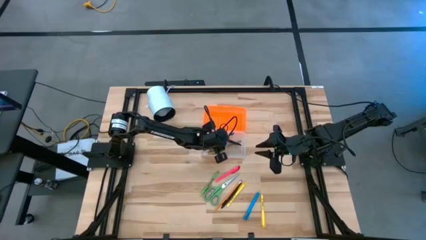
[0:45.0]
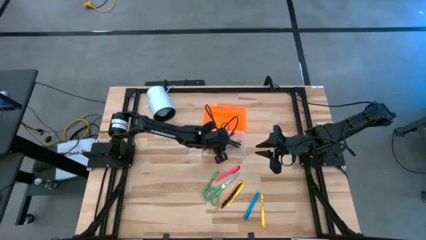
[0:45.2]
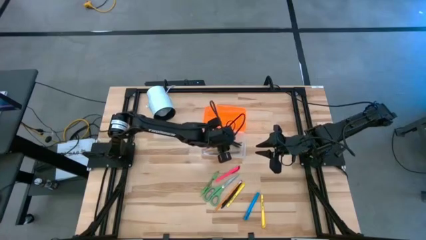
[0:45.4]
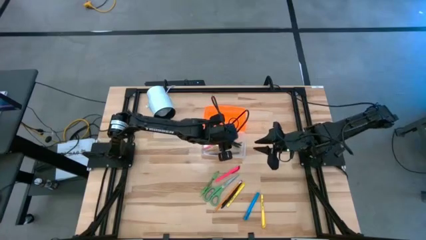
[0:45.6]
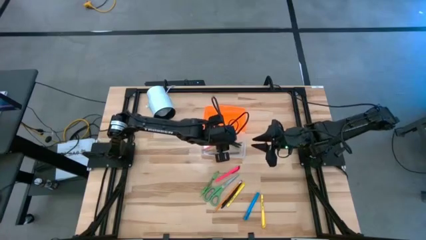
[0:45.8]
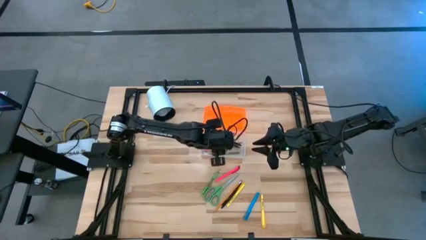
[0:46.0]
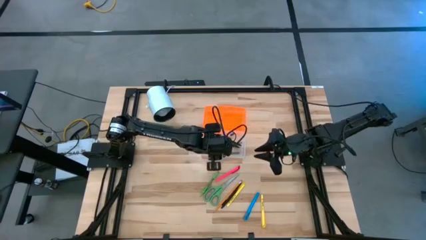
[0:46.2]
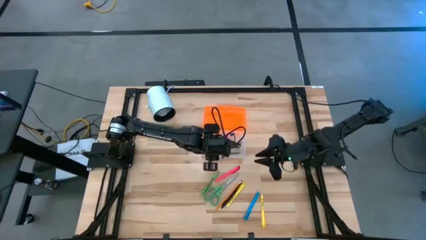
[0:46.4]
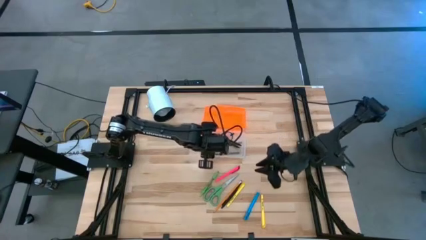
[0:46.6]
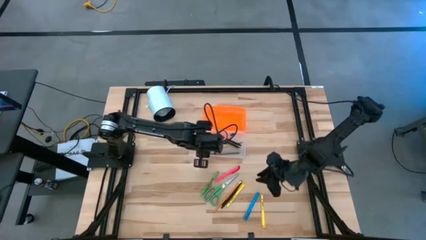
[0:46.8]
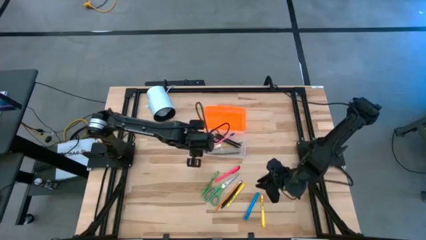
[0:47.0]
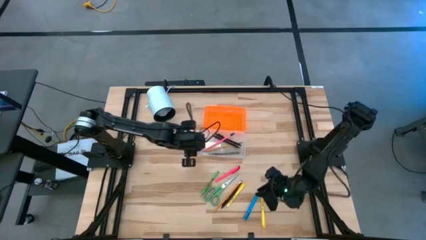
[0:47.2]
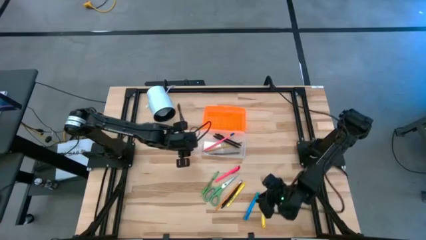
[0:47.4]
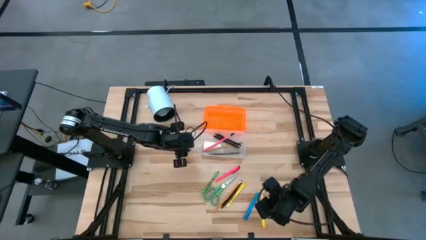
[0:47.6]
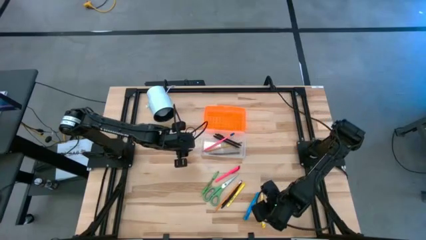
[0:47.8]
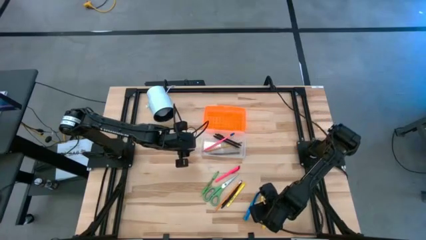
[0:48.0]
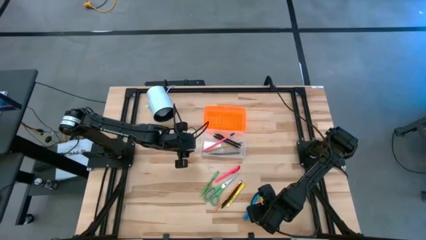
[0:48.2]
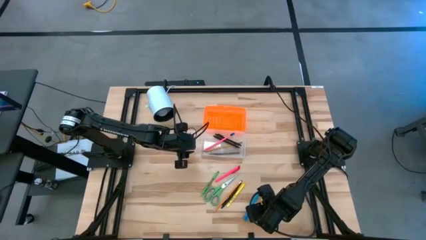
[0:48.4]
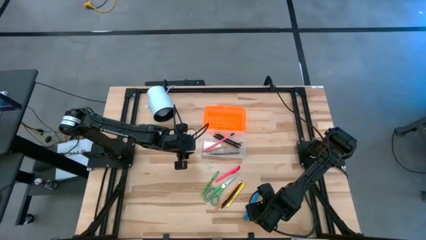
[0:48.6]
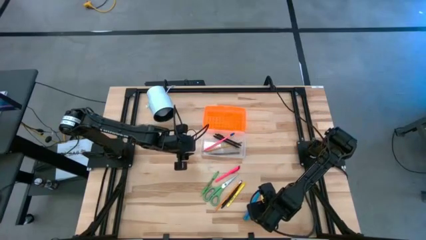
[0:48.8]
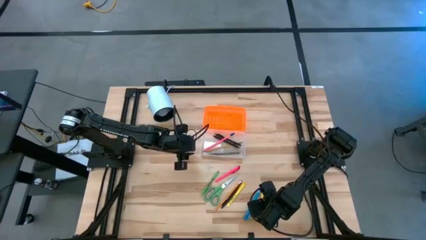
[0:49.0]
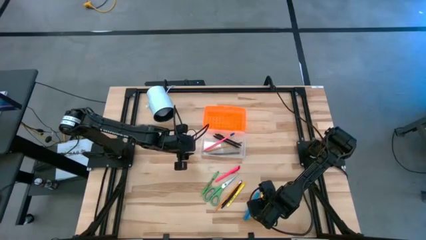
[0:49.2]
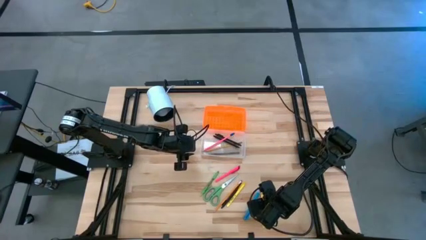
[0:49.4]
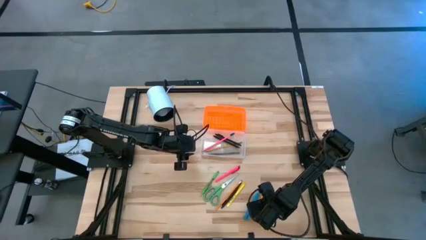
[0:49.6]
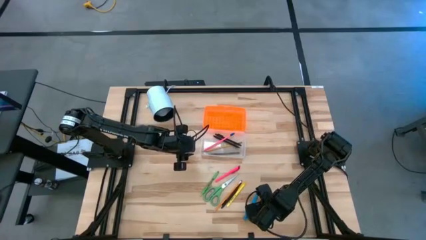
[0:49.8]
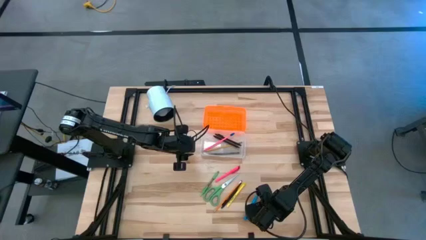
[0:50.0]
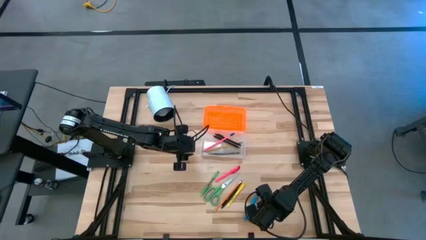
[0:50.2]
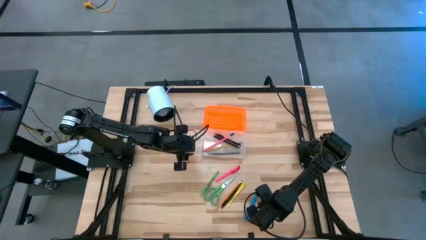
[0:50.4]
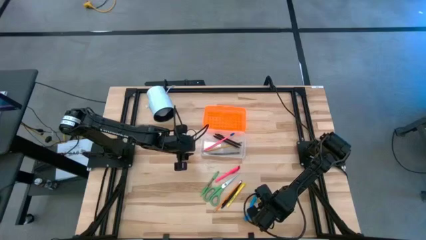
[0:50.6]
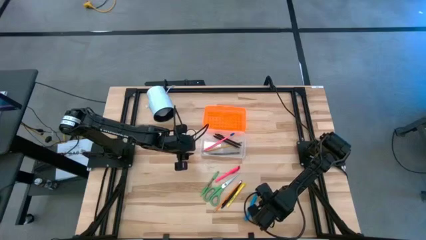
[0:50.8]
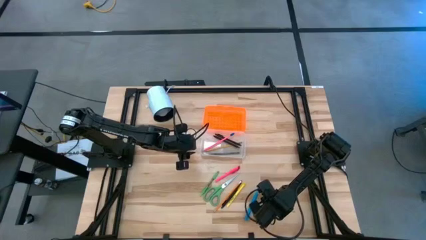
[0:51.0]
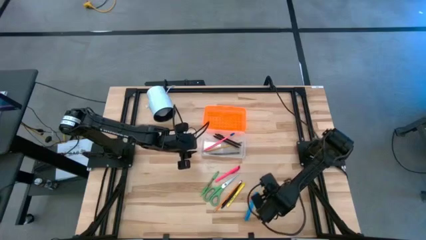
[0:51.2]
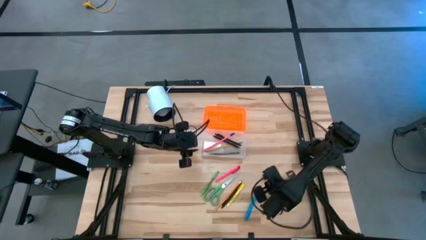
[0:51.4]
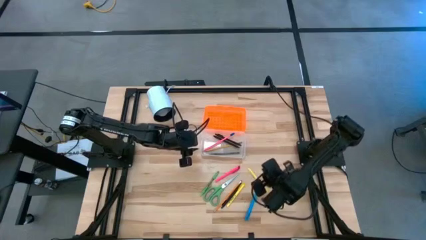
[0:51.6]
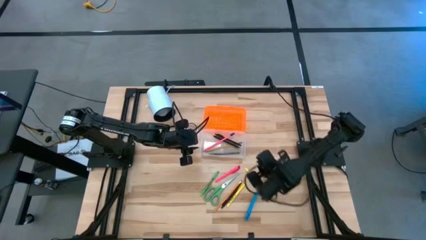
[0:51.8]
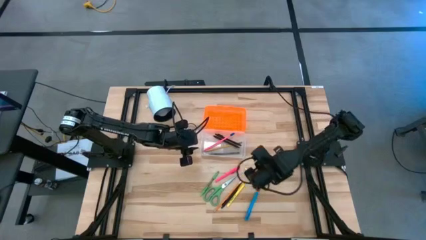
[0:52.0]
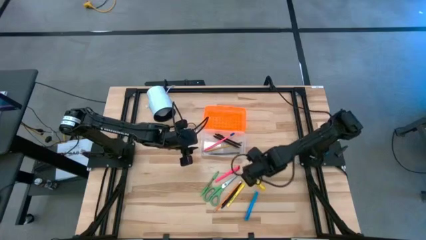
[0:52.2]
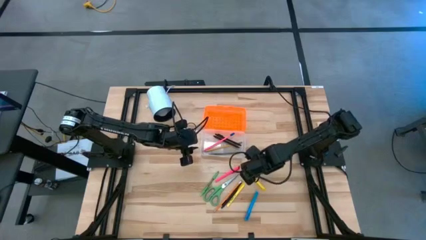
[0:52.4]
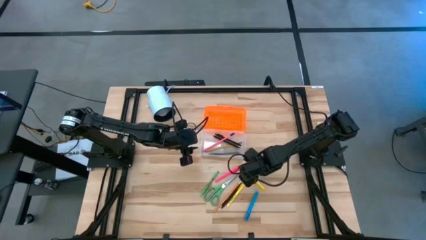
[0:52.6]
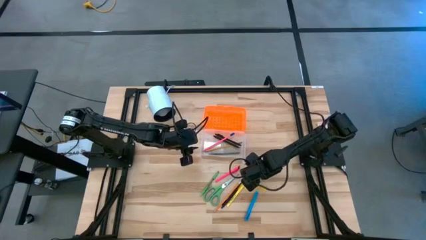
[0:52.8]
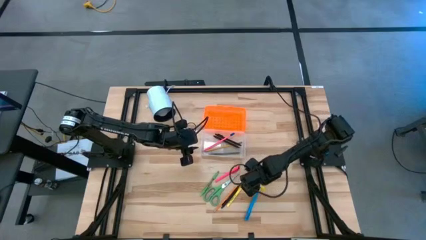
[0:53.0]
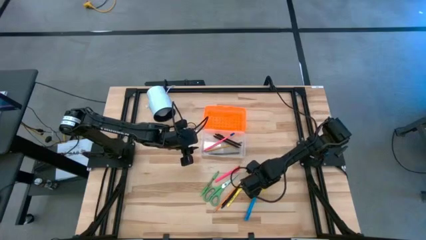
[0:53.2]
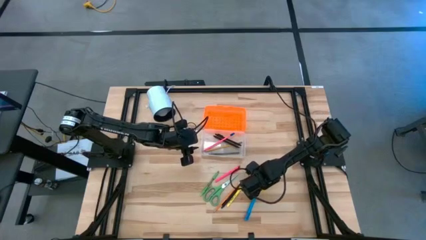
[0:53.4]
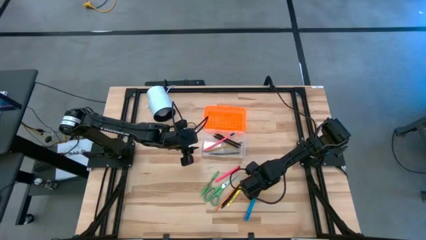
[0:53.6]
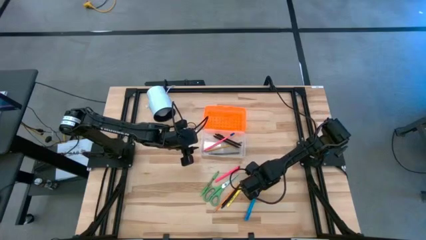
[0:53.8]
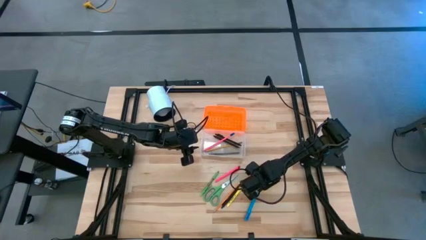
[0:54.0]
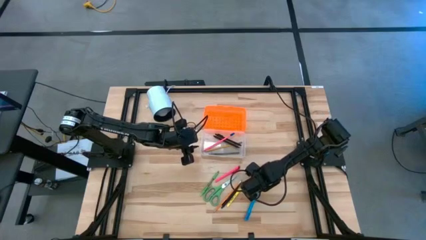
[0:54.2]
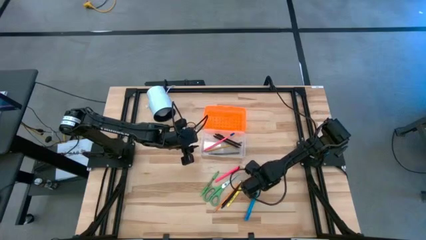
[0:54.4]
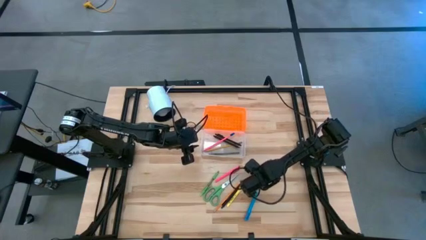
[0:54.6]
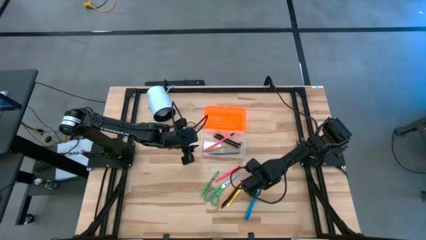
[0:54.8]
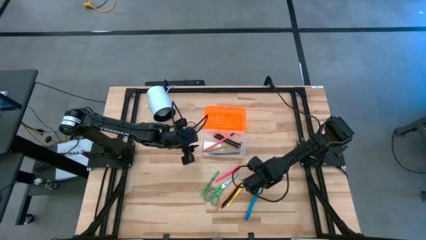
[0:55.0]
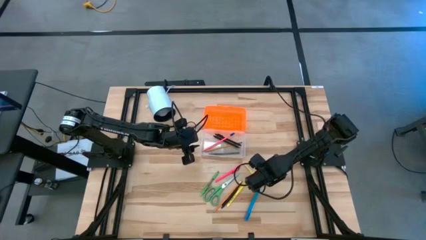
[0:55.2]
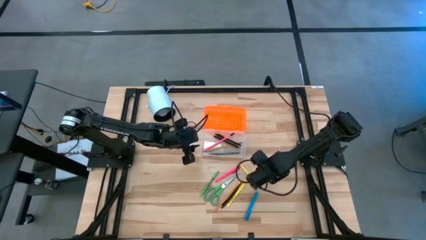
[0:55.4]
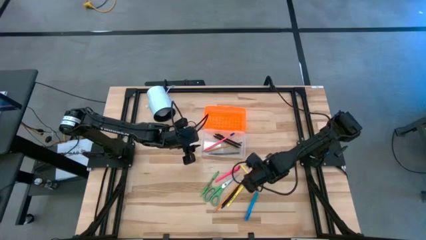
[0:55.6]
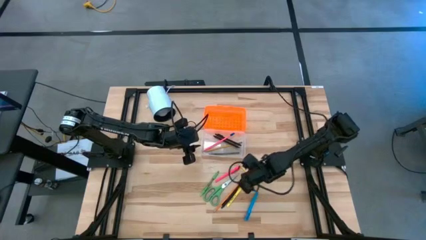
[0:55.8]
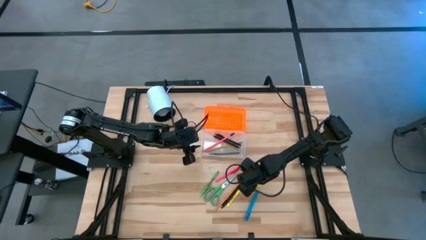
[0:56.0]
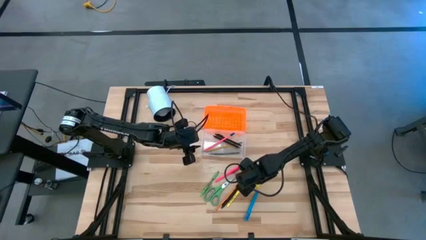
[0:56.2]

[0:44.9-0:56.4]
Task: Pick & place school supplies into a supply box
Put the right yellow pen into the orange supply box

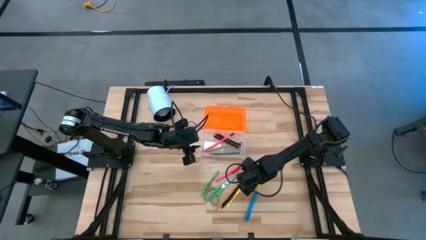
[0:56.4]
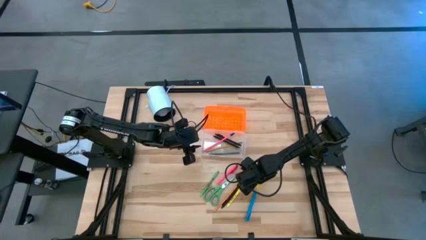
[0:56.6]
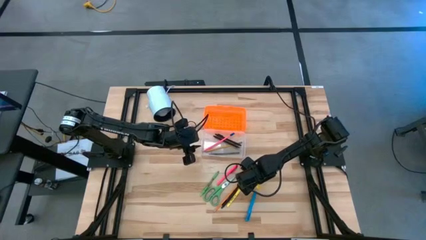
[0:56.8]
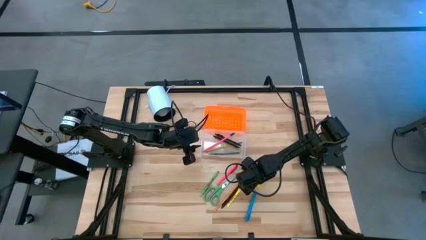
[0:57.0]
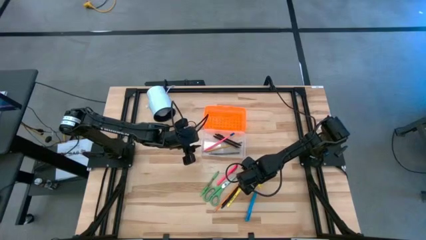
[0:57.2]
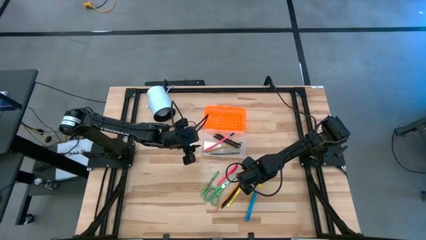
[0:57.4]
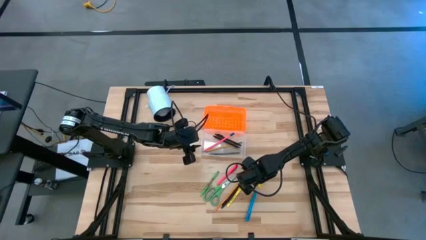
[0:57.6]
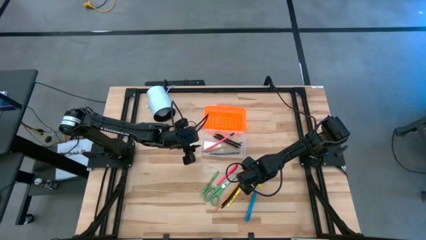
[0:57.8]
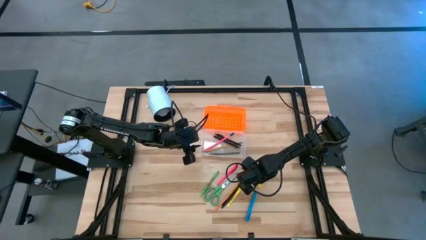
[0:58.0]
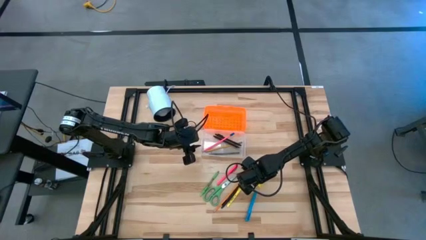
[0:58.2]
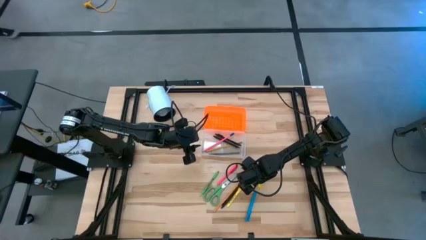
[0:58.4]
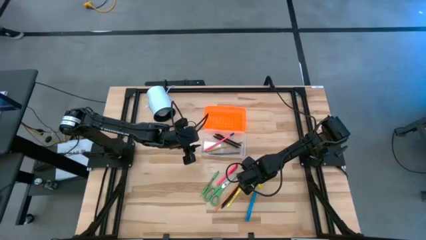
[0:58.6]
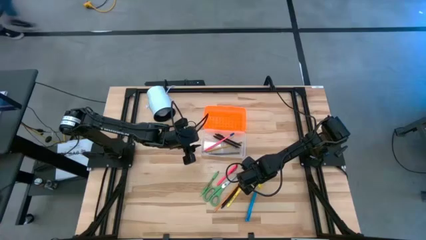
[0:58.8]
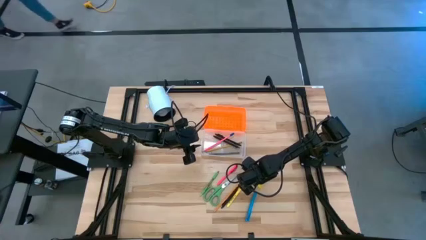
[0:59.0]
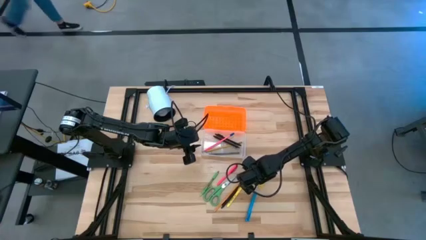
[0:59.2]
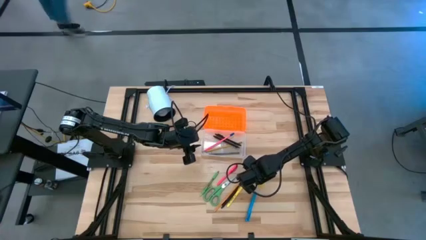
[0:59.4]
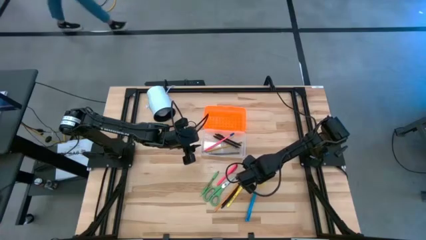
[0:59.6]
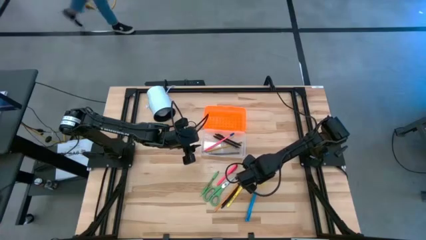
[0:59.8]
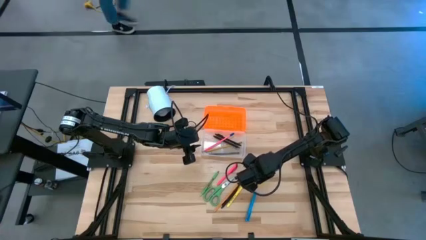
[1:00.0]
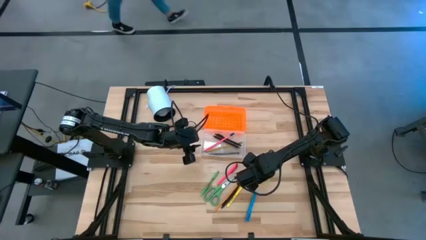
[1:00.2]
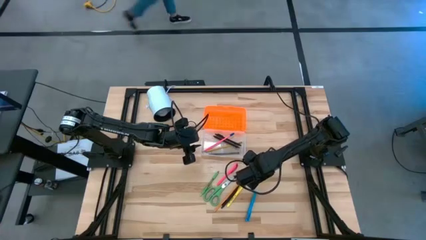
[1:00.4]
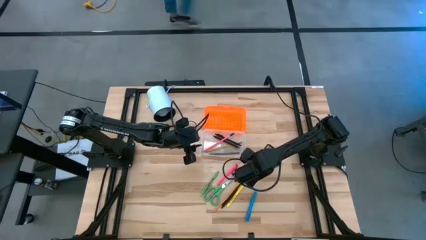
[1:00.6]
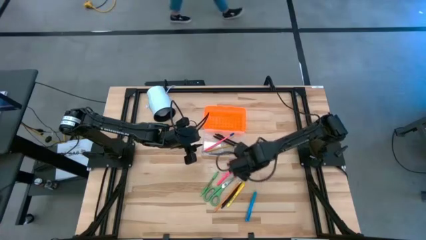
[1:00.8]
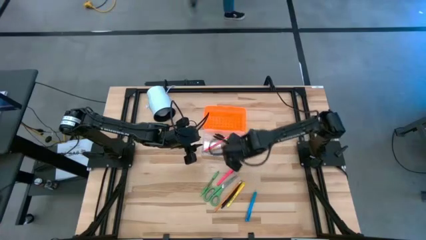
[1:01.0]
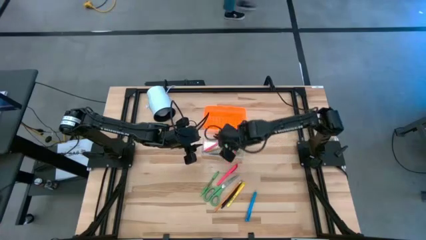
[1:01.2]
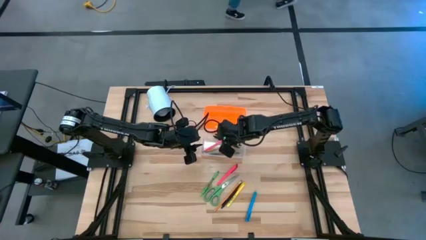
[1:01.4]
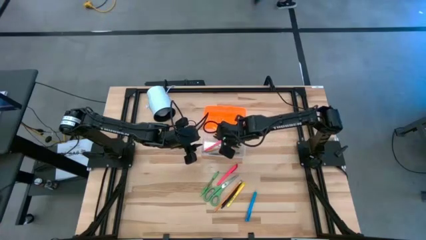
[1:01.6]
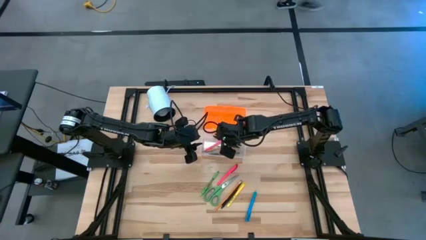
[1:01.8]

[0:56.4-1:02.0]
Put the top yellow pen into the orange supply box
